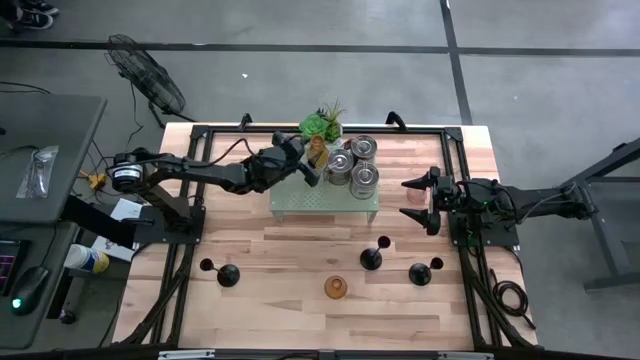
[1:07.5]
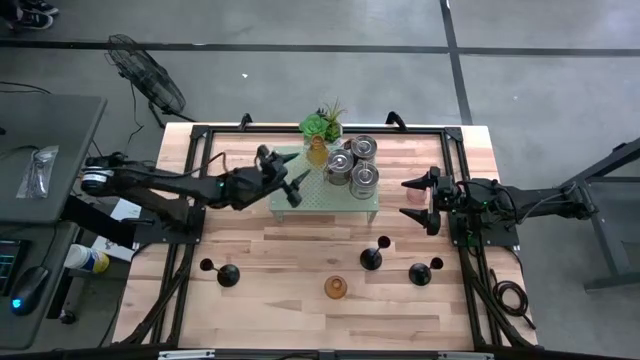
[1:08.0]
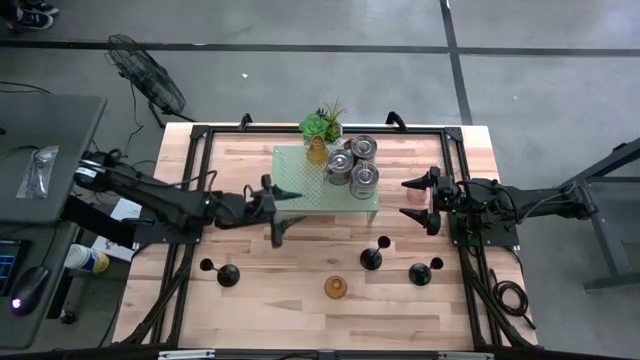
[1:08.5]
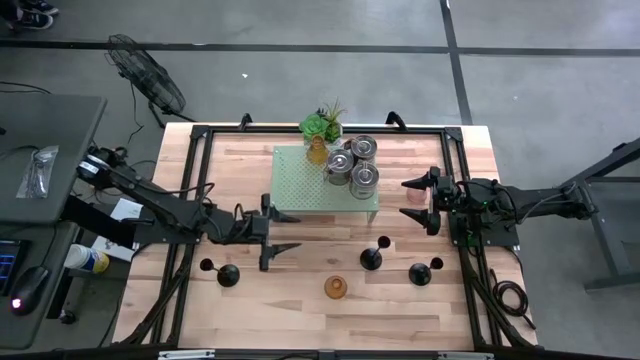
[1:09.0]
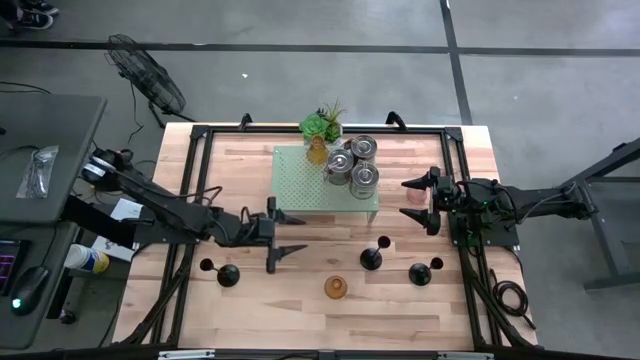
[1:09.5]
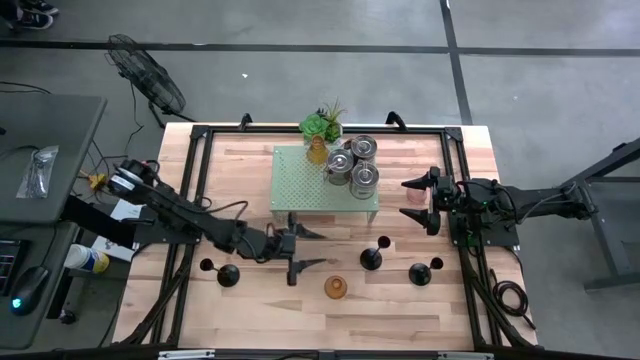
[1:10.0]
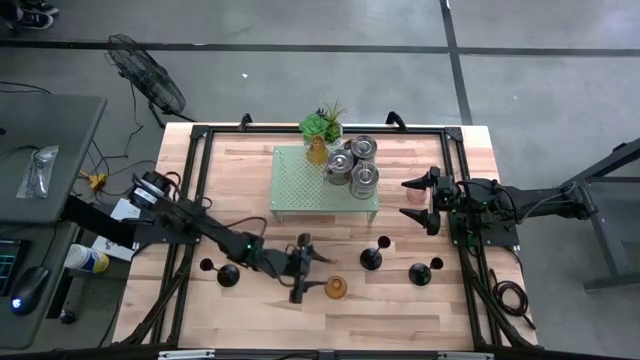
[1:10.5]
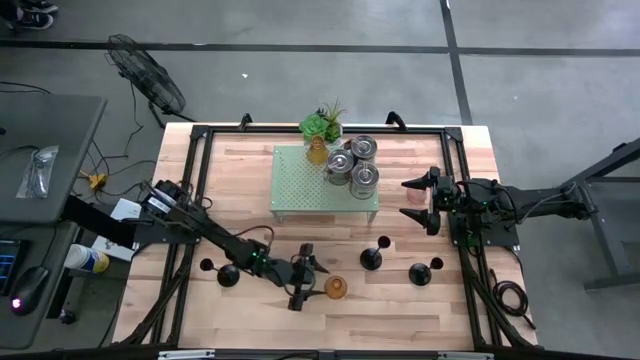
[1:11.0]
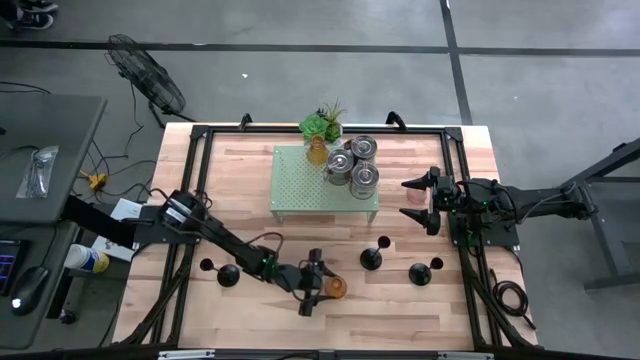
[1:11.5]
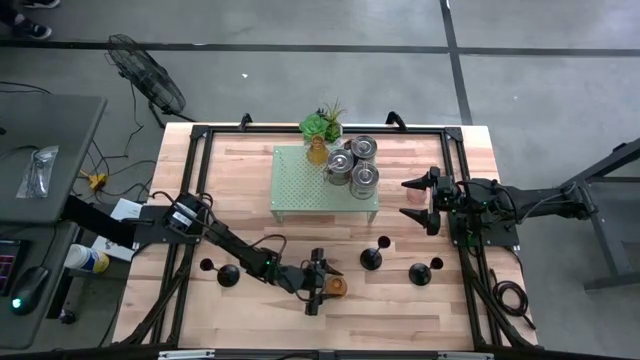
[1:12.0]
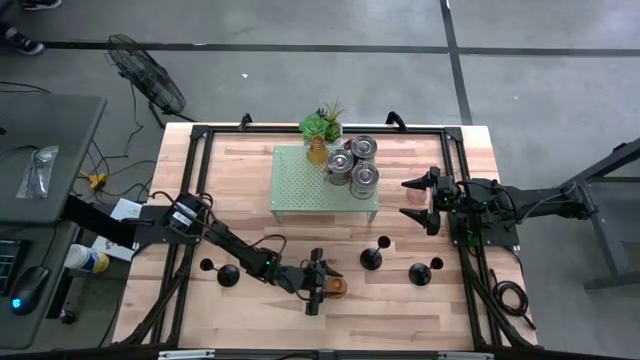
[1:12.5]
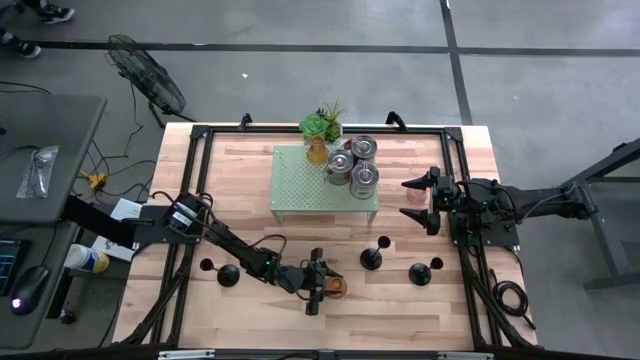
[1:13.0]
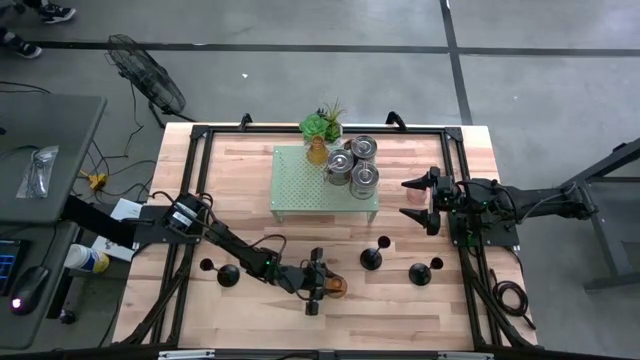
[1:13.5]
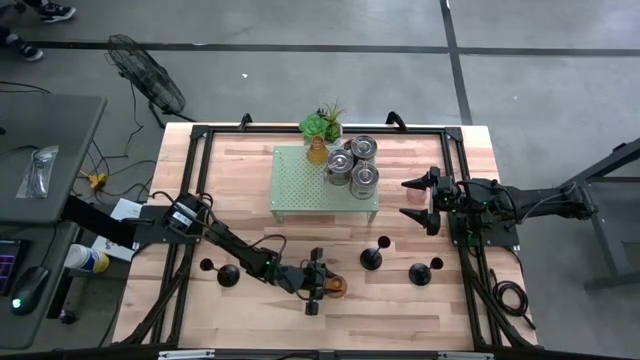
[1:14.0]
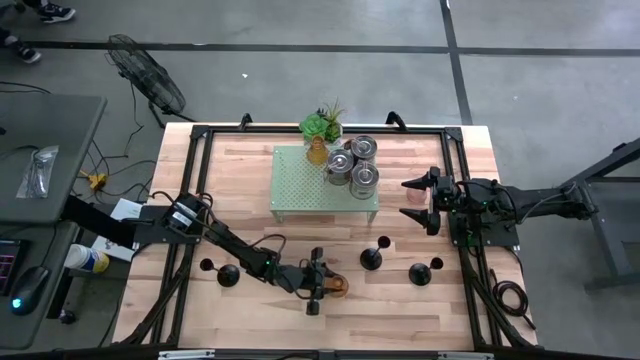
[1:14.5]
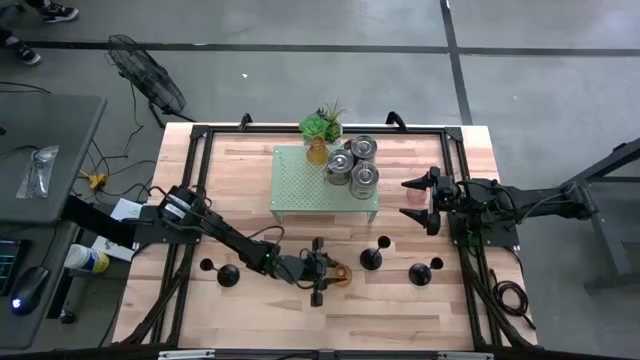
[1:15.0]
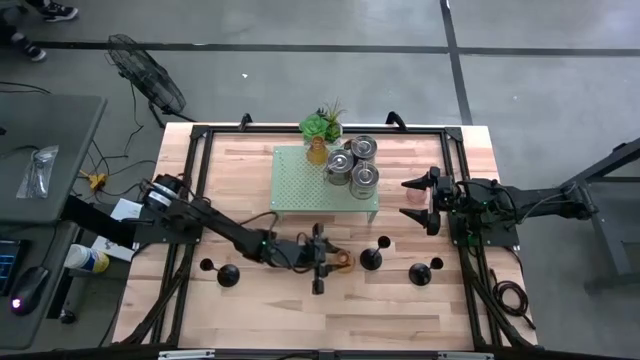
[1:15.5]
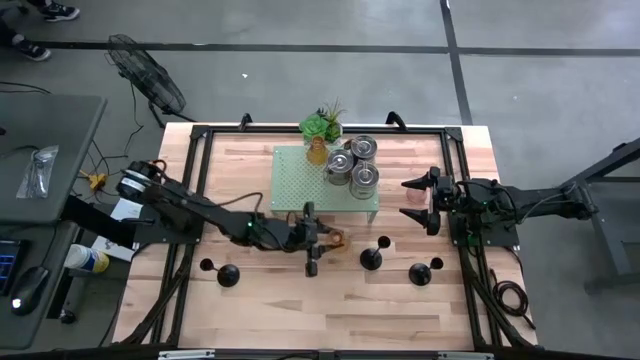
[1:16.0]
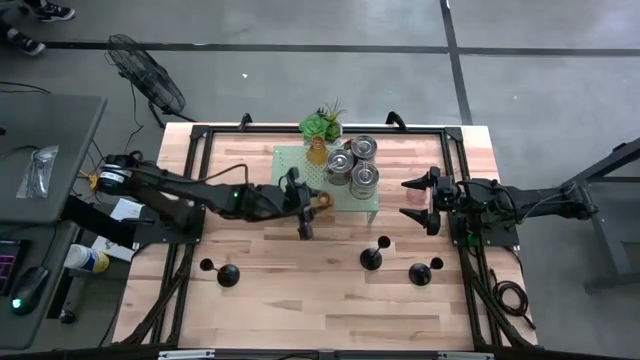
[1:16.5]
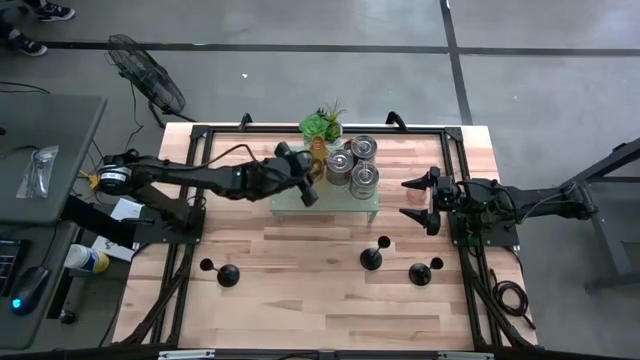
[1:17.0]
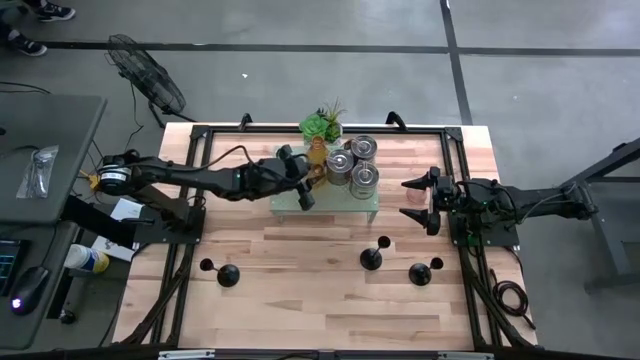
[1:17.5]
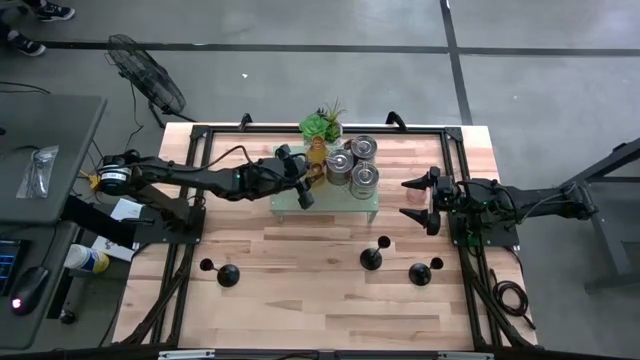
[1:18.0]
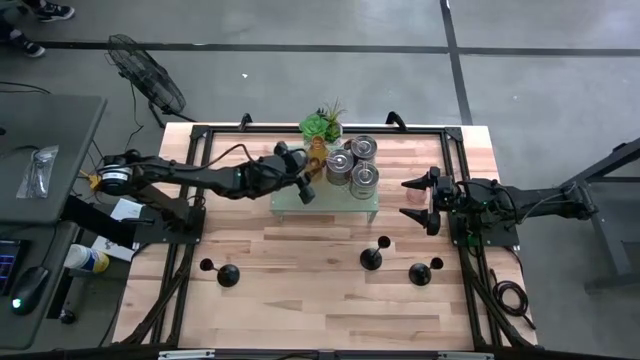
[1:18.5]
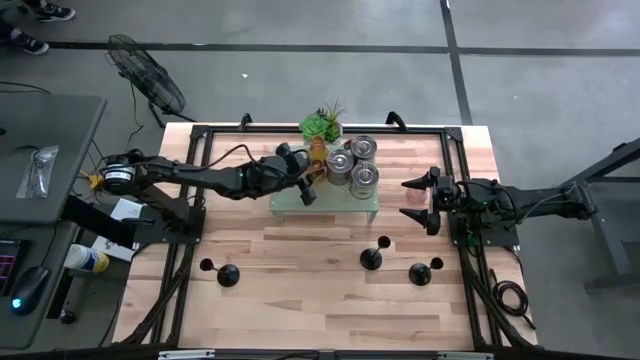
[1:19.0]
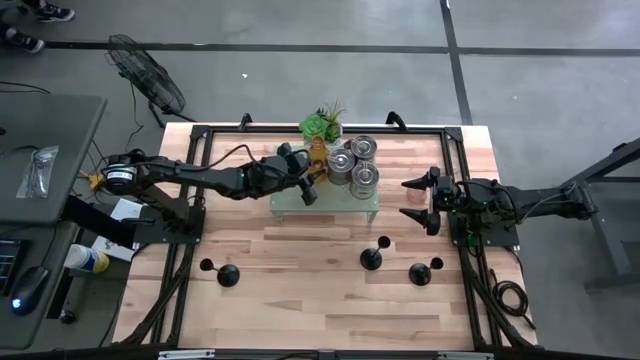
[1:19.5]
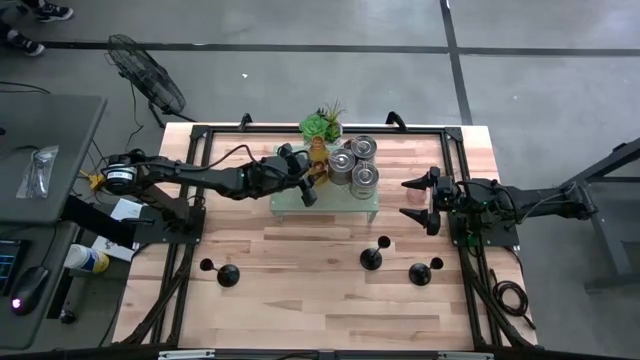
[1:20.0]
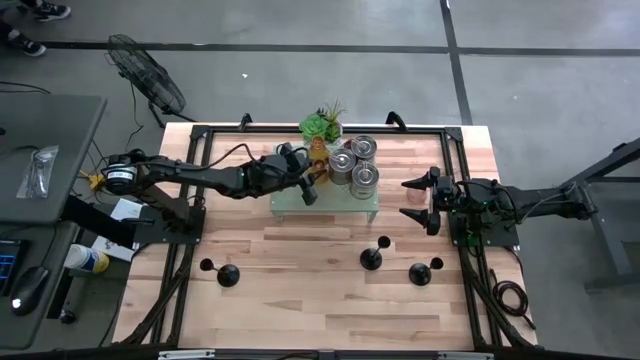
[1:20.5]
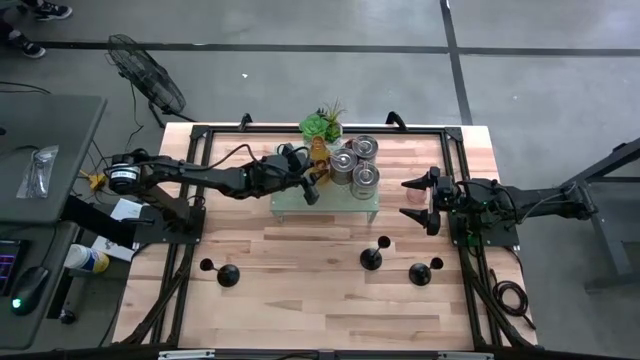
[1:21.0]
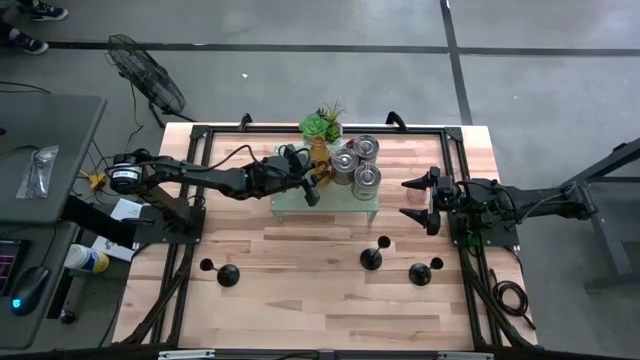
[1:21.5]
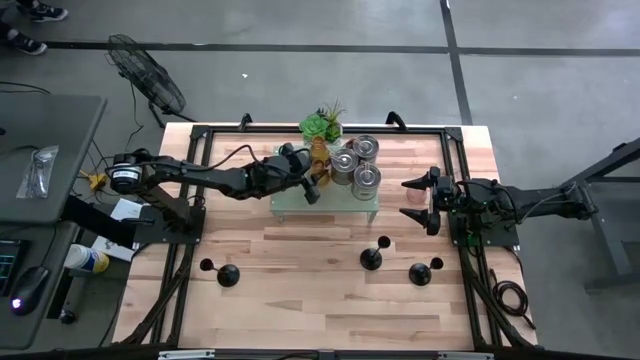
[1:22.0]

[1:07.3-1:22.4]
Task: Pick & Place candle stick holders
Put the gold glass candle holder on the shelf

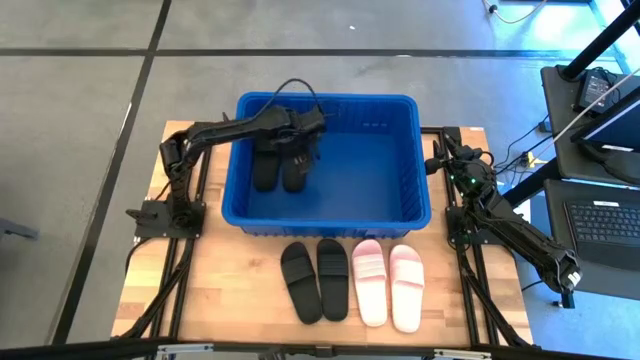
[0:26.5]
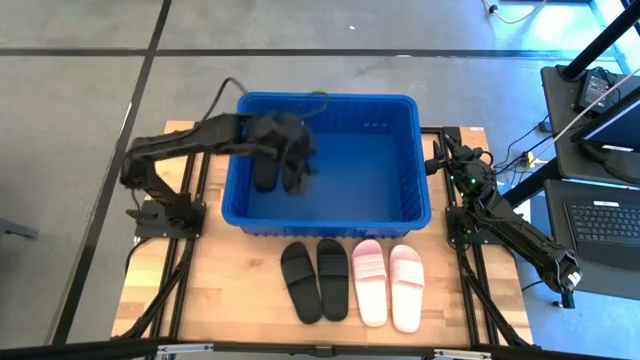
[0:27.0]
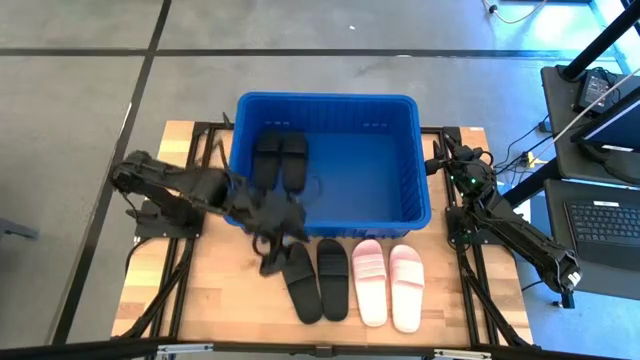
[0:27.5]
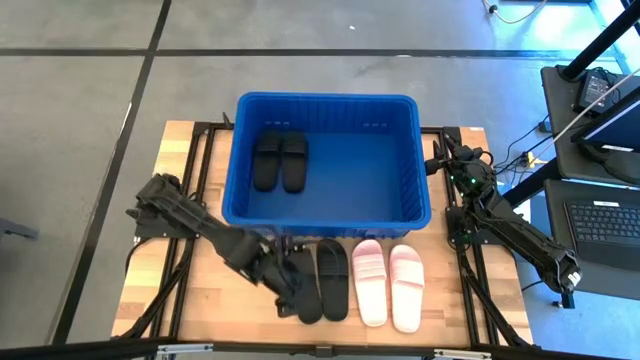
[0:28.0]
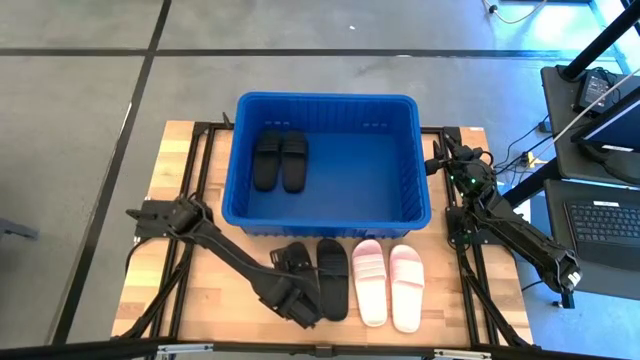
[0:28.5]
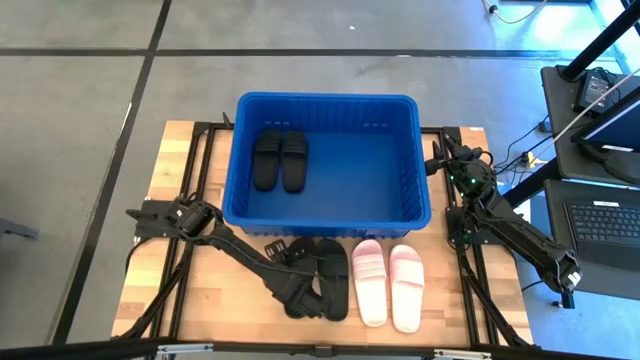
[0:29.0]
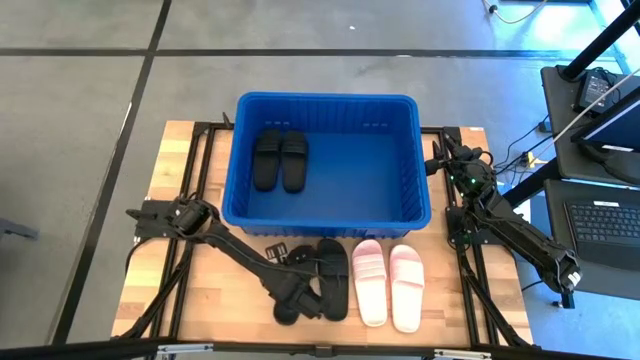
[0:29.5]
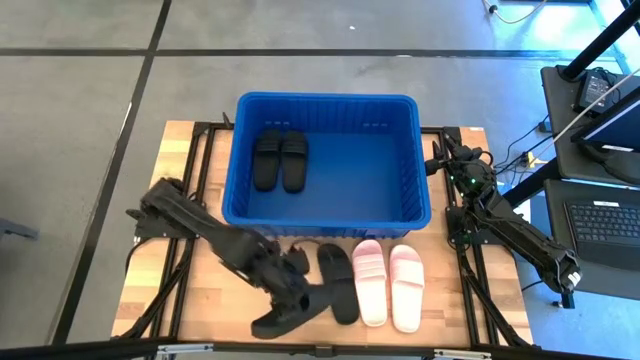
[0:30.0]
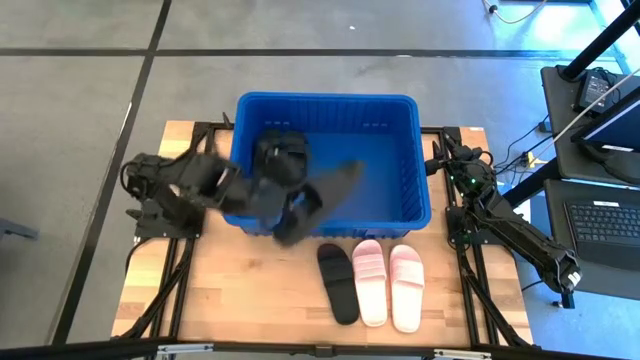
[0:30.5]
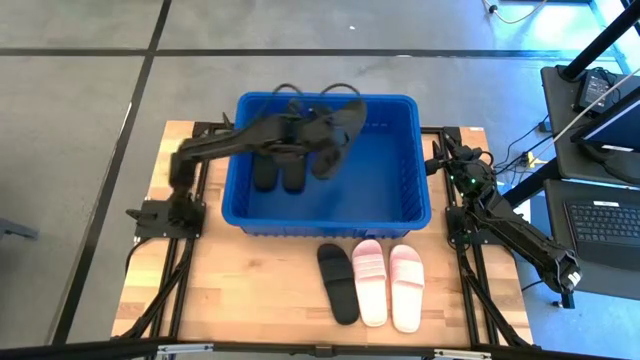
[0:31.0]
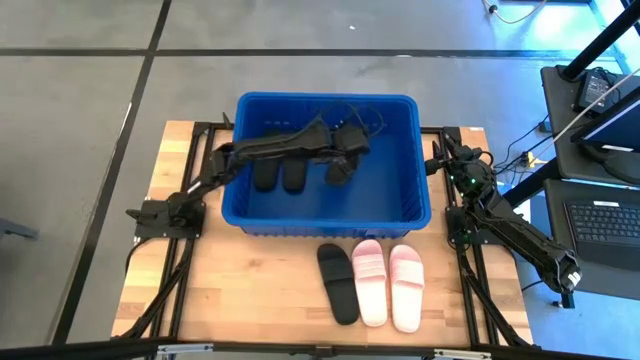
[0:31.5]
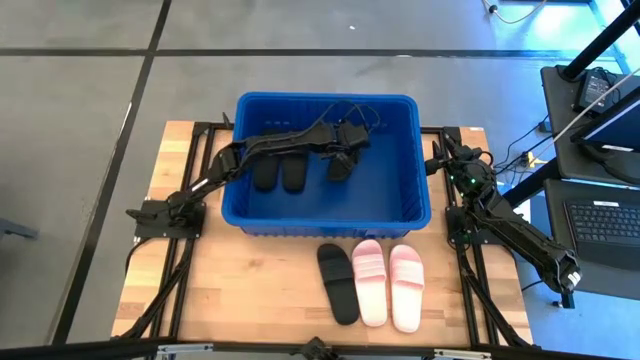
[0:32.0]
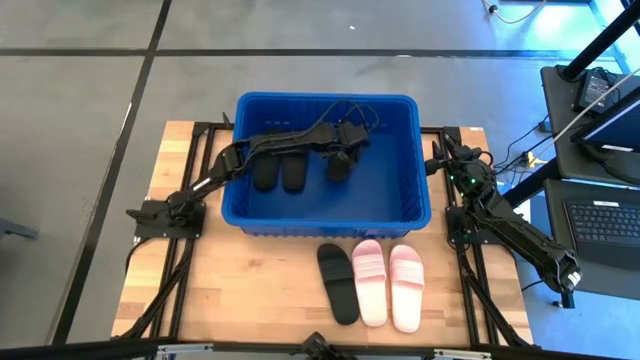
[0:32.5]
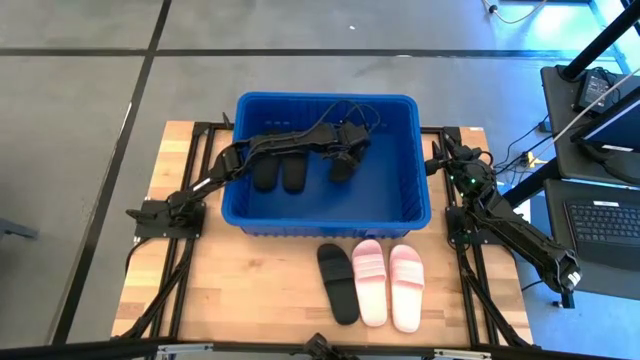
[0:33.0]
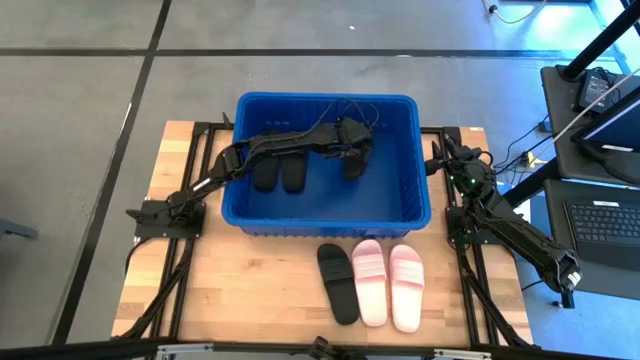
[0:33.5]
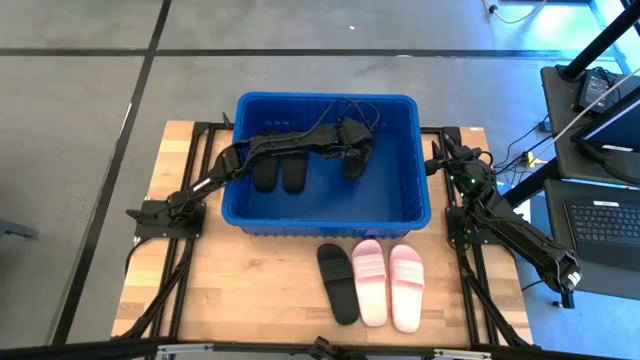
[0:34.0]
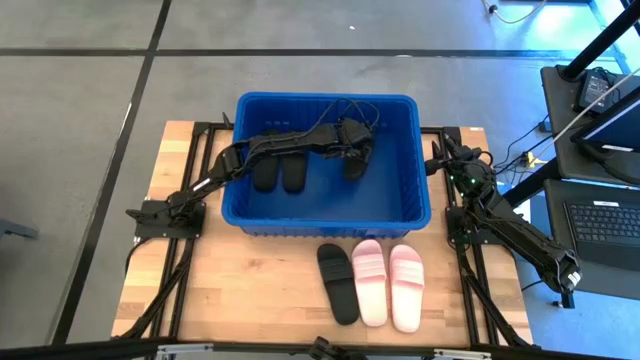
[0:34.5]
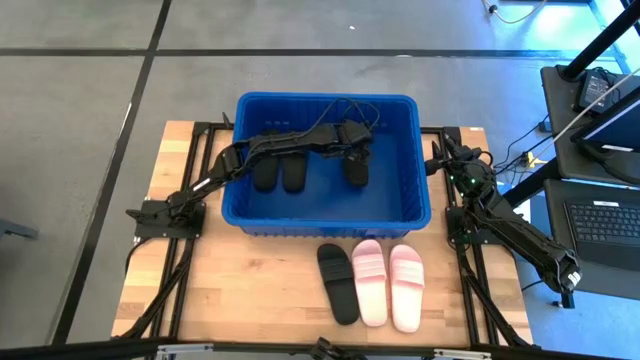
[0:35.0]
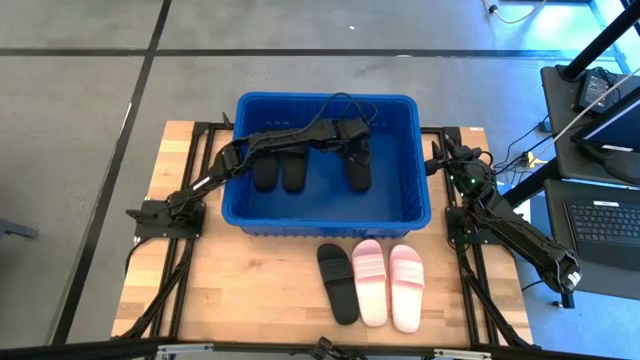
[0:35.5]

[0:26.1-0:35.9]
Task: Pick and place slides into bin
Put the black slide into the blue bin
